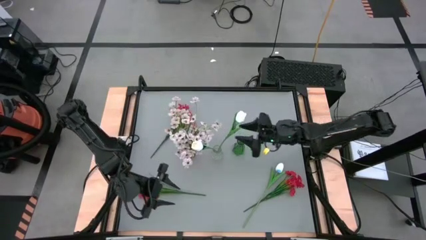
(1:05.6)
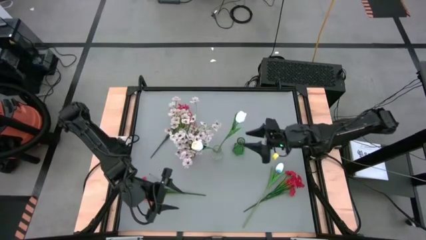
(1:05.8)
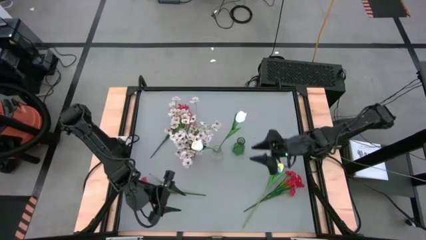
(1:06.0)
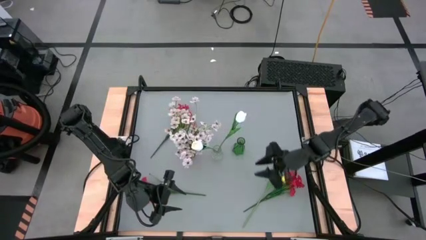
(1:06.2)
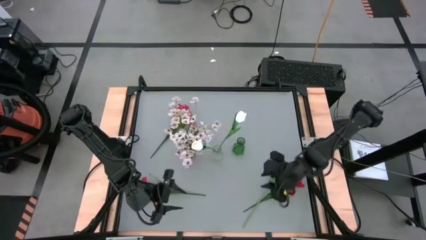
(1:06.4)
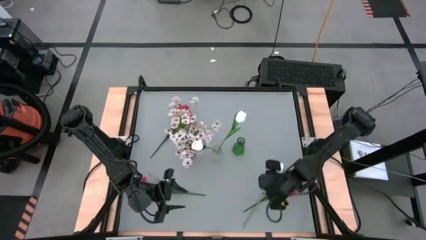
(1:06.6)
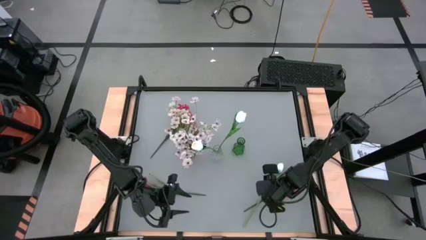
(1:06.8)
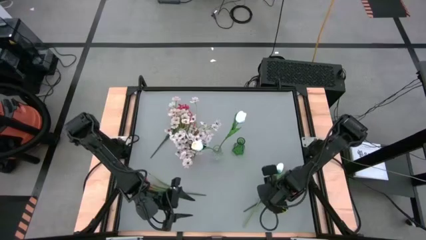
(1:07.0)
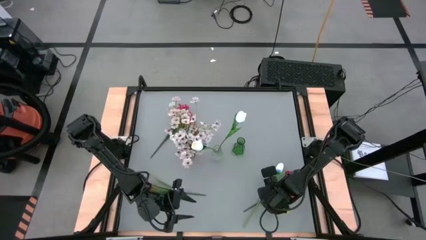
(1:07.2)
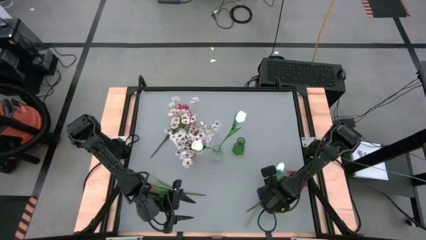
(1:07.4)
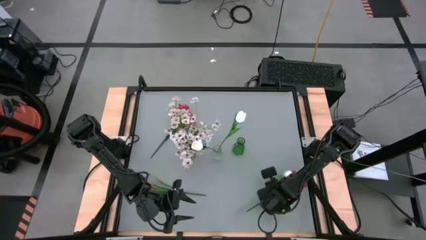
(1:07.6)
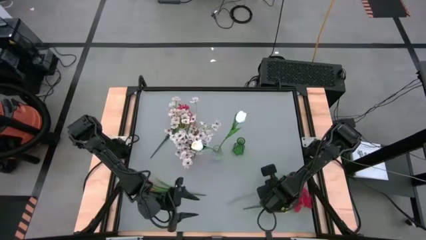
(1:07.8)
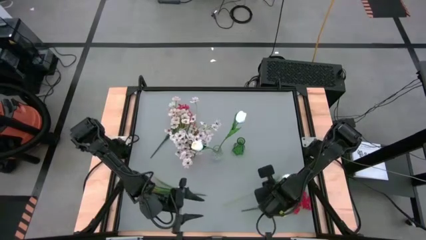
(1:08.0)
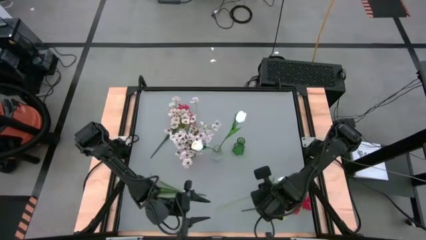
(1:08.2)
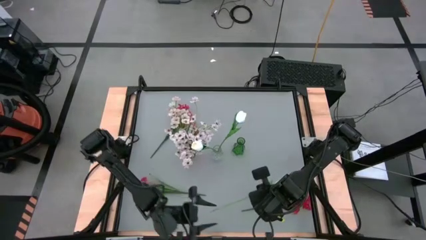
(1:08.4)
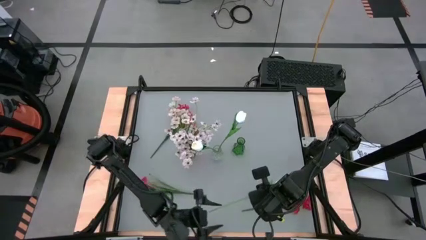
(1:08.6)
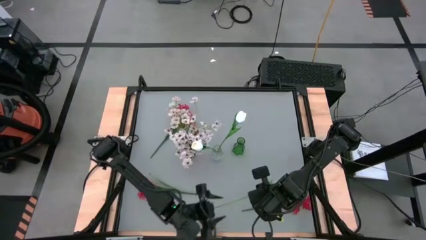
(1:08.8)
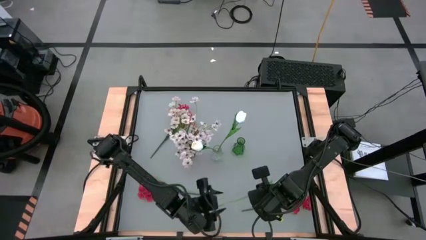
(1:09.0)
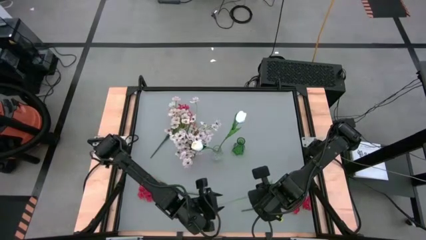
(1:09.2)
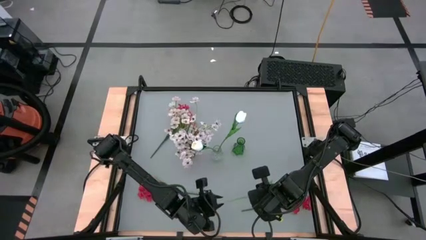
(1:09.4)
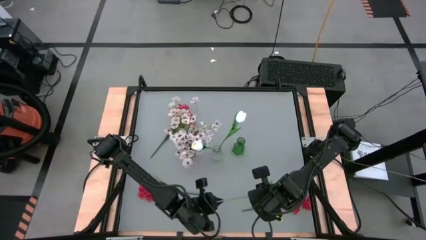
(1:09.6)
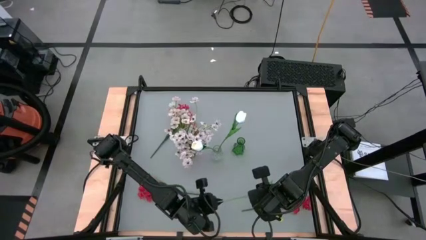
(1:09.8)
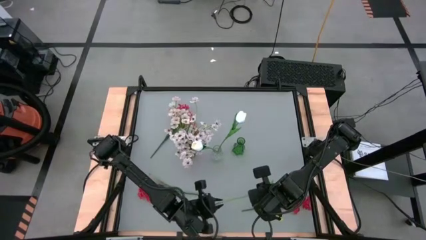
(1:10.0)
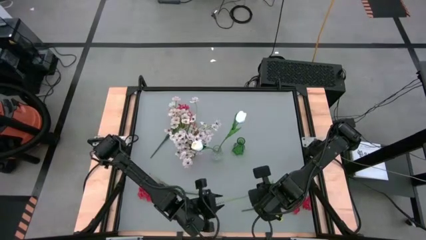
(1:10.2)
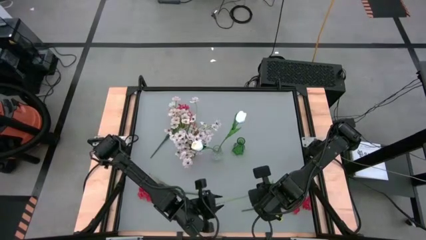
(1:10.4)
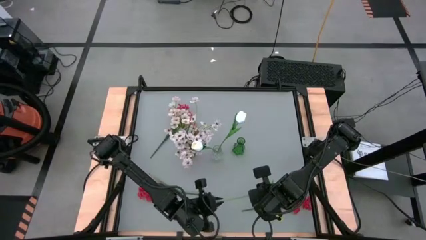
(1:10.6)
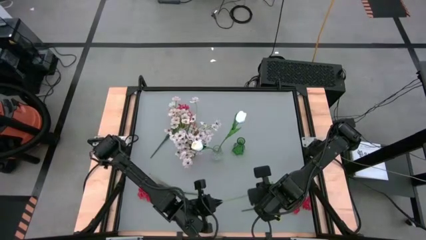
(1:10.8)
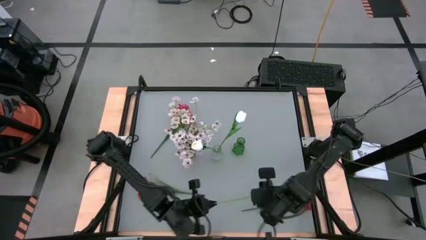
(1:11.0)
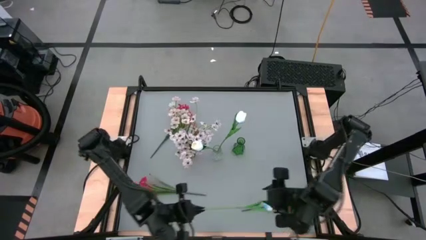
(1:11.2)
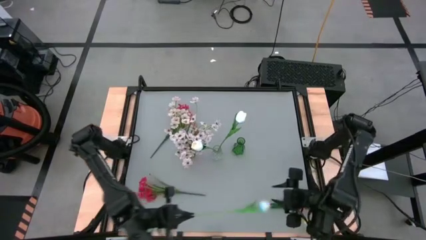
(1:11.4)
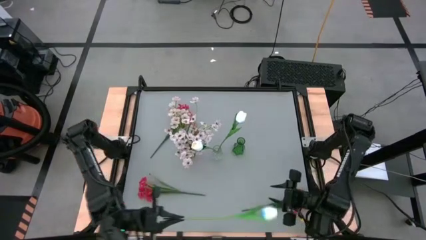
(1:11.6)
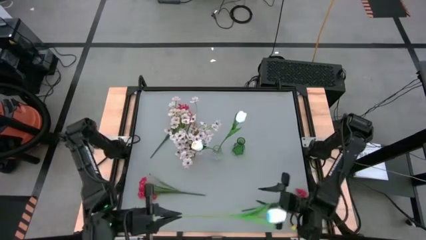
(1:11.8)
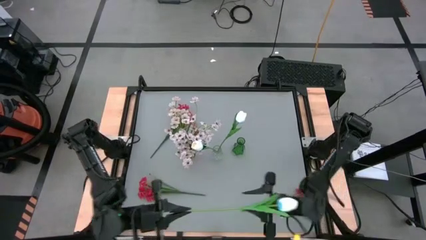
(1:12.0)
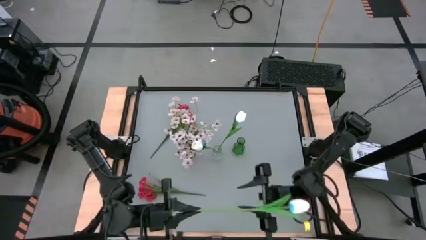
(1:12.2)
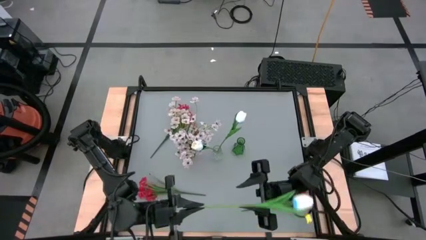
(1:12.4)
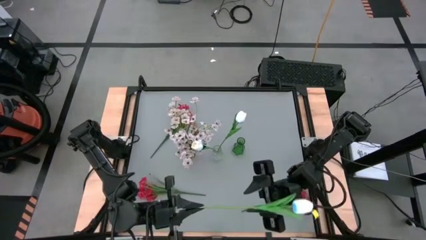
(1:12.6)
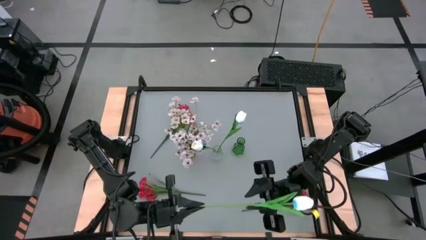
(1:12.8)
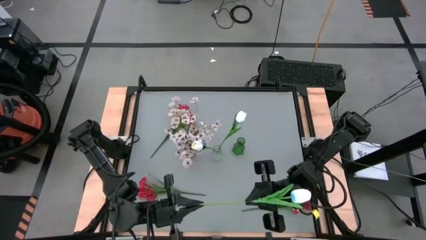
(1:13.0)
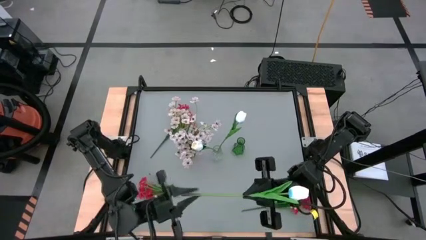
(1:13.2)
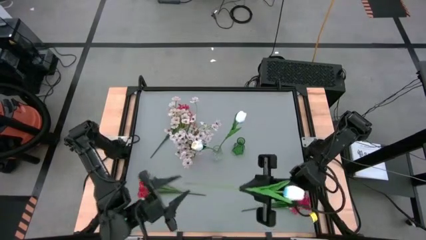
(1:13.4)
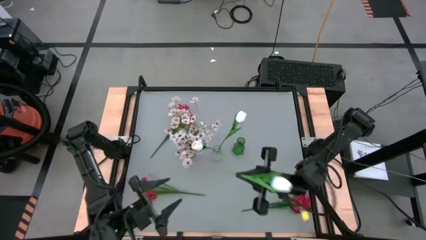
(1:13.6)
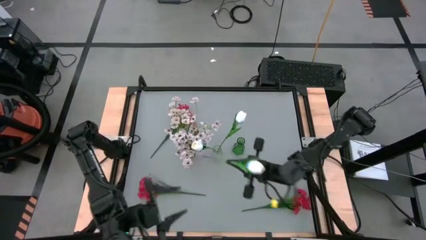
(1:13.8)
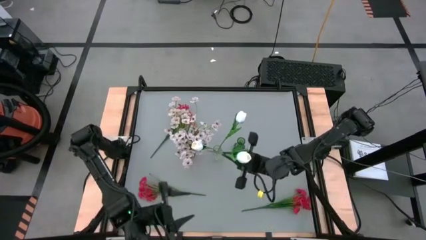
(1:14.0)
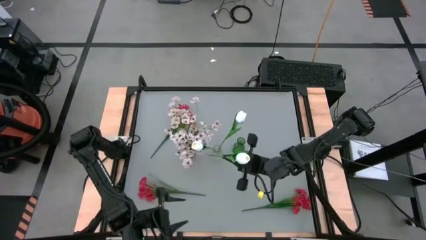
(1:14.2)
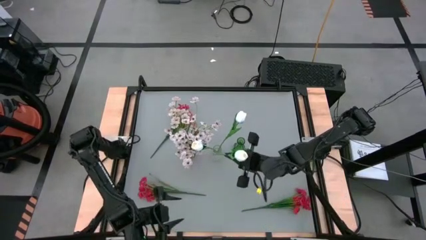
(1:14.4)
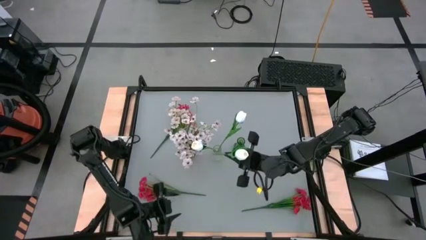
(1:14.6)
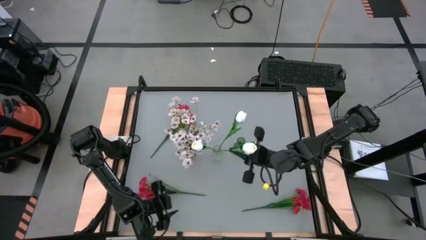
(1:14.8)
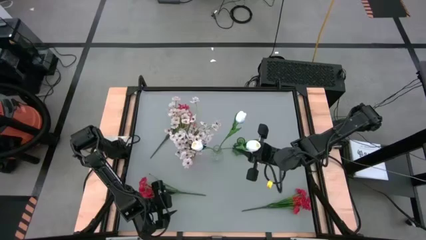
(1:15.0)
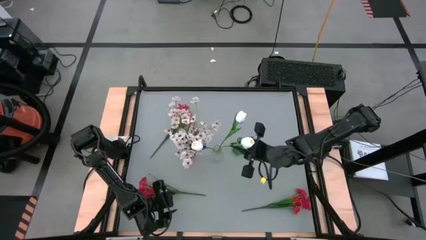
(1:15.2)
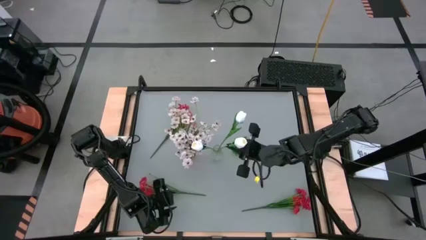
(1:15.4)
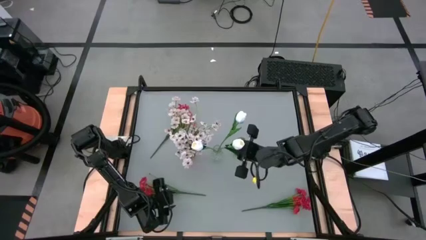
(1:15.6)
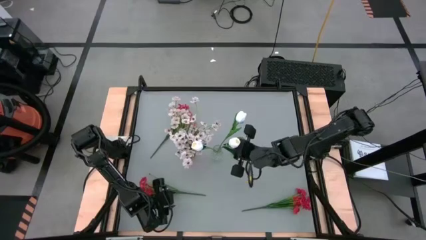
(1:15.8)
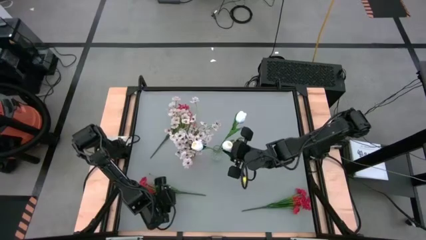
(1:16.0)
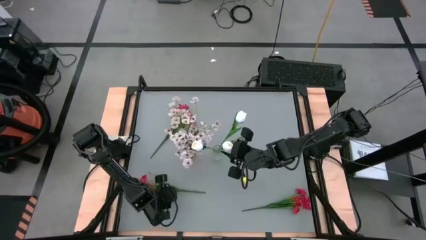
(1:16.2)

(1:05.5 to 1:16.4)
Task: Sort flowers into vase by color
Put the white tulip into the transparent flower vase

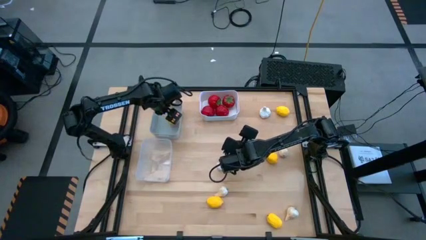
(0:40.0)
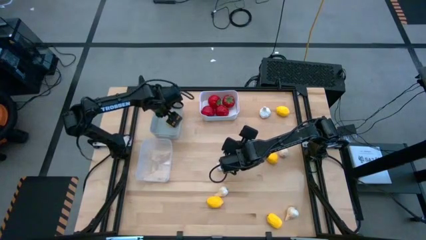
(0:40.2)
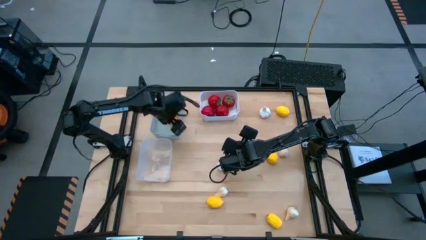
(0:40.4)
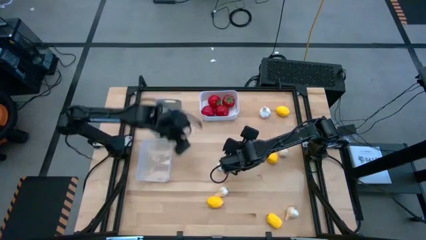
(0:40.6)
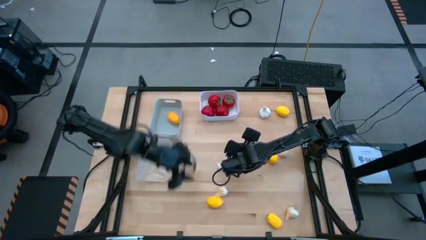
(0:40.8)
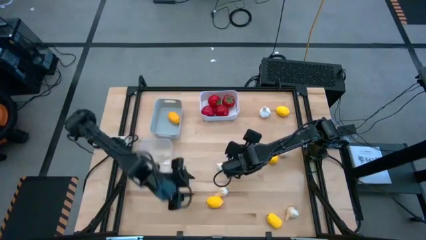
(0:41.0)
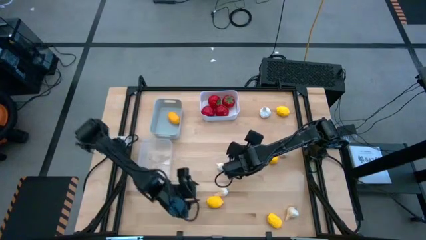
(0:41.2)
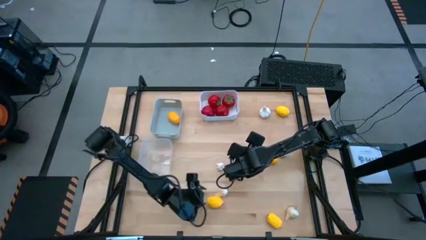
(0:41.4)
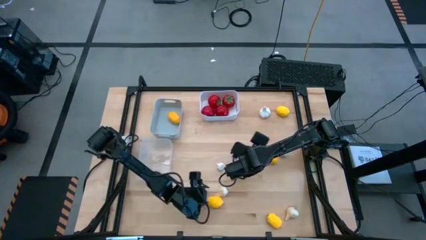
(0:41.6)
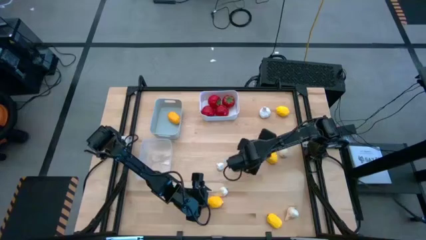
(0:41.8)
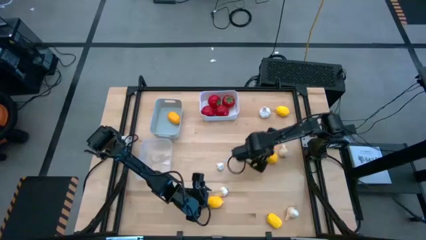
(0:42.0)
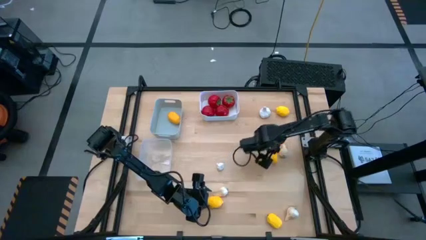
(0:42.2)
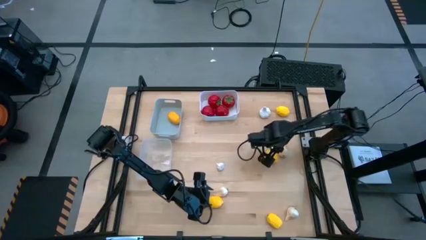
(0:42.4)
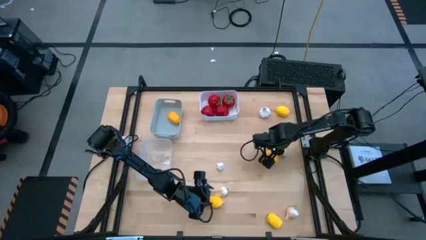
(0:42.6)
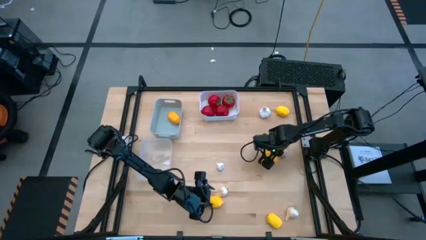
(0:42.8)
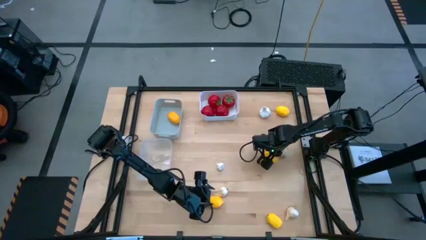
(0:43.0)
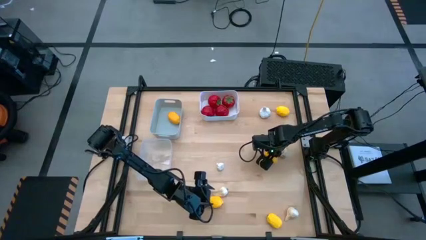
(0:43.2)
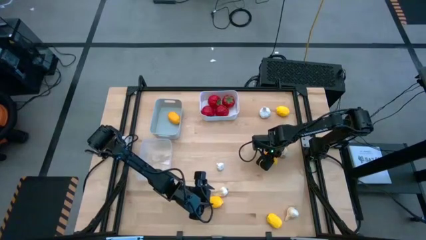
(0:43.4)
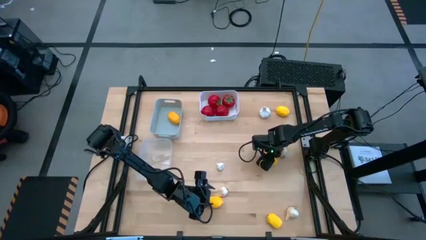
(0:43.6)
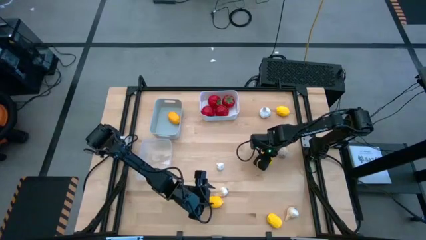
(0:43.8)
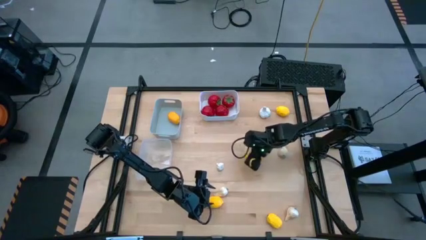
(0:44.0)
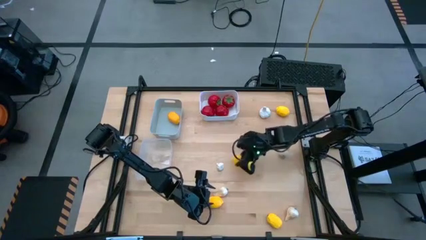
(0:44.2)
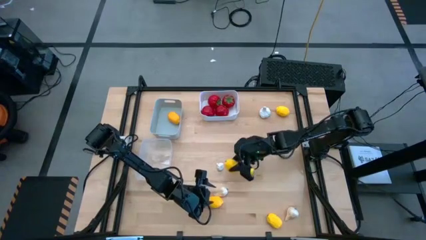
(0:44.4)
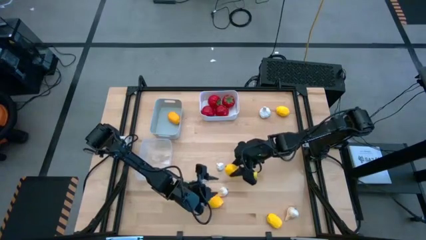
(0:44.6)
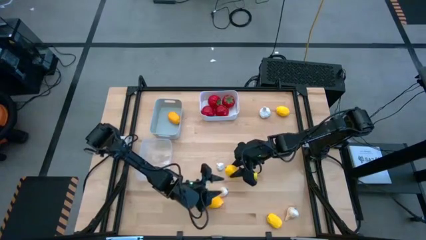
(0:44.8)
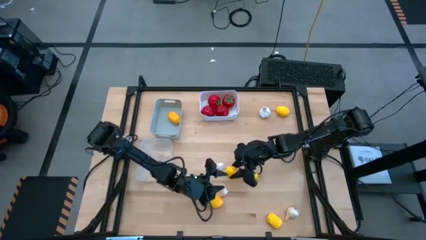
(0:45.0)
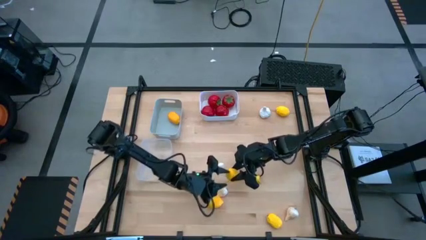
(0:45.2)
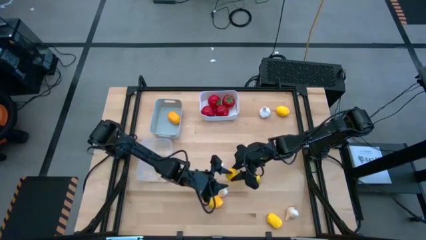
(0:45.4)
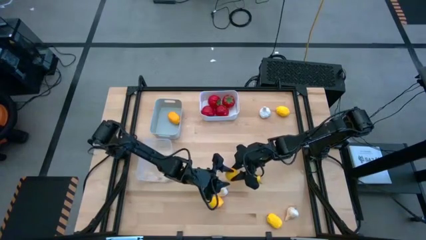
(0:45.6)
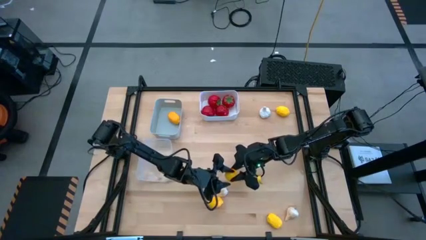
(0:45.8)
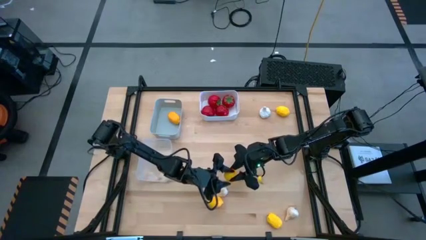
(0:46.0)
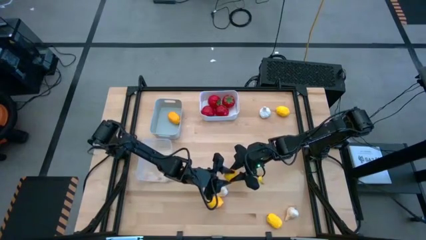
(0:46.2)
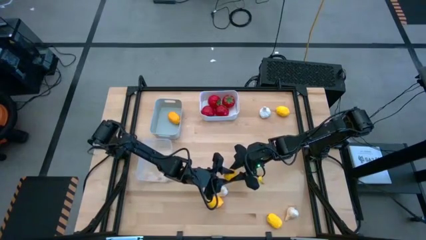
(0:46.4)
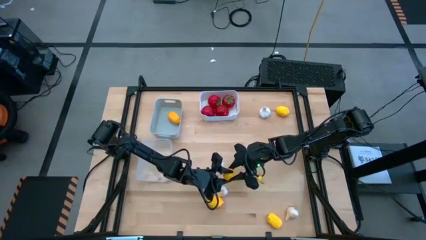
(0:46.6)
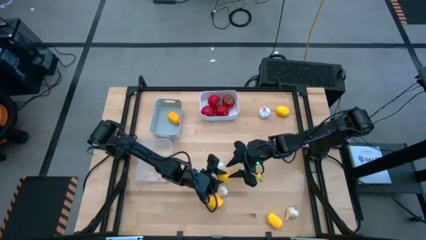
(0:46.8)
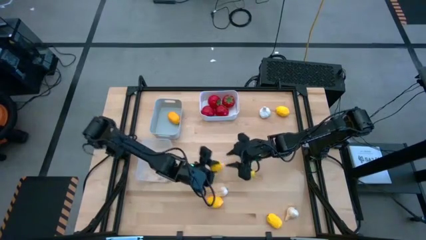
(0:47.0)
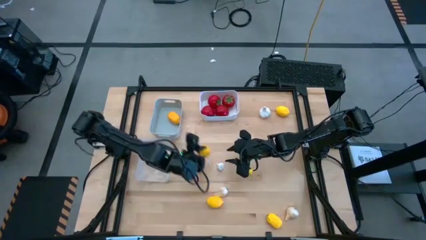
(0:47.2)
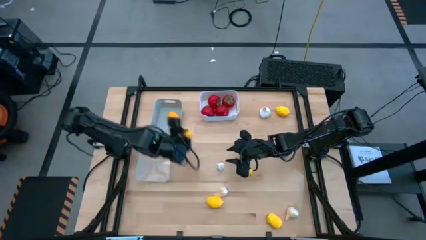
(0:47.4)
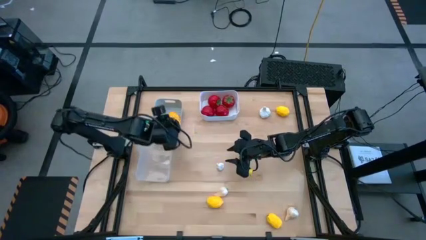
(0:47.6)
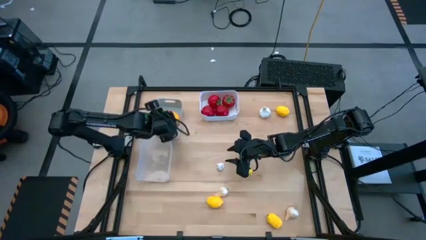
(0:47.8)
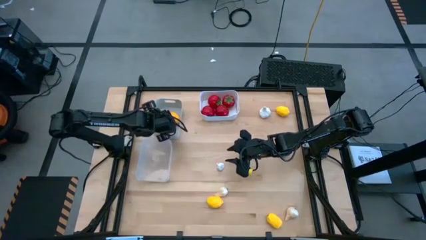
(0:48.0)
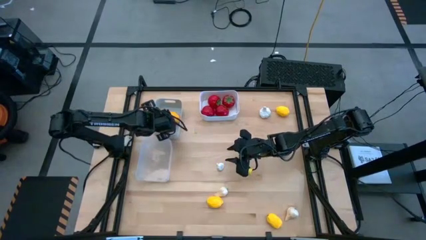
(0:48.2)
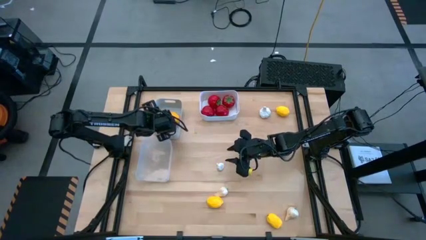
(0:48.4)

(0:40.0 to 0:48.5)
Task: Sort produce into baskets
Put the yellow lemon into the gray bin
